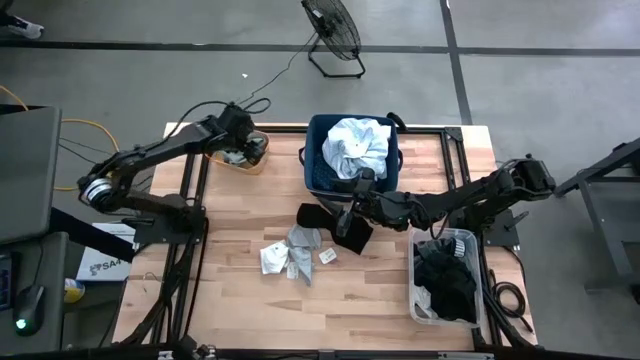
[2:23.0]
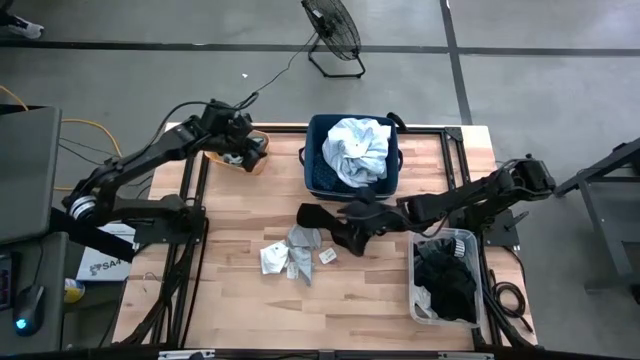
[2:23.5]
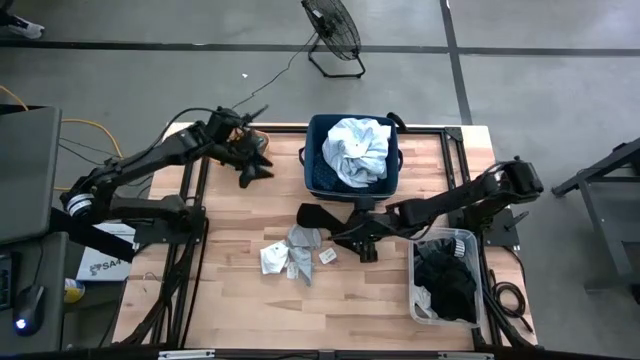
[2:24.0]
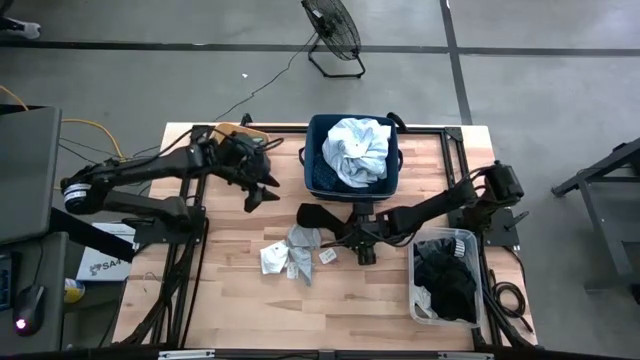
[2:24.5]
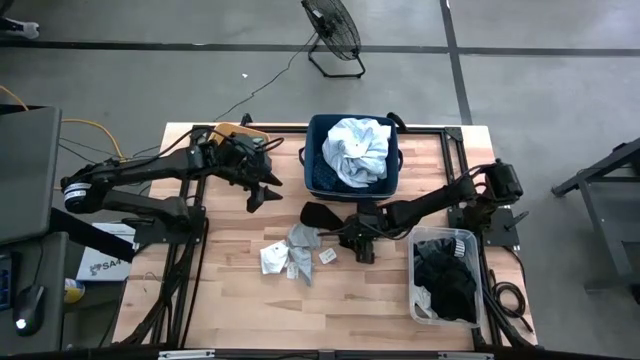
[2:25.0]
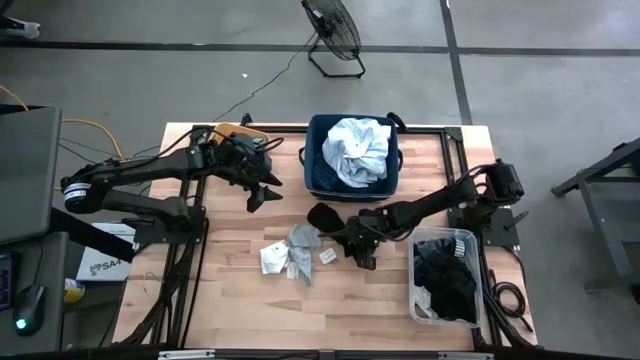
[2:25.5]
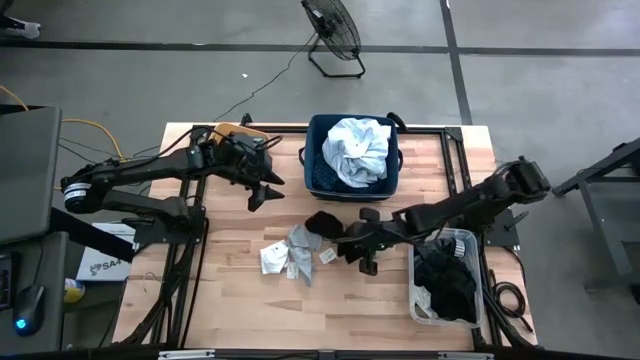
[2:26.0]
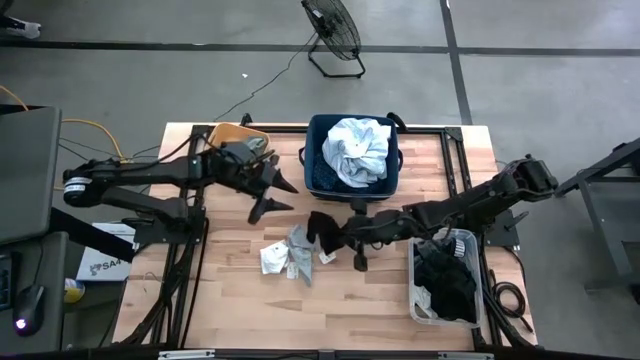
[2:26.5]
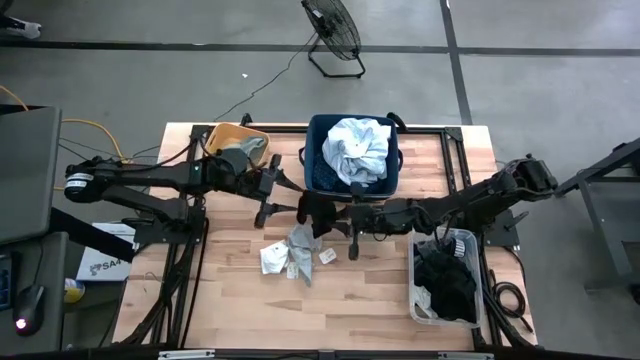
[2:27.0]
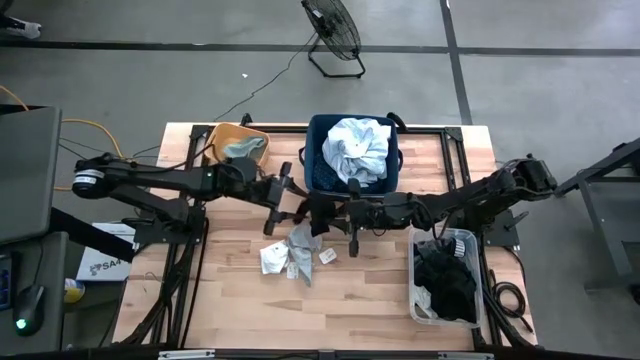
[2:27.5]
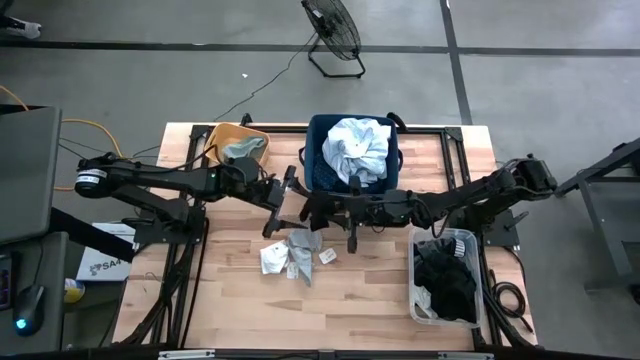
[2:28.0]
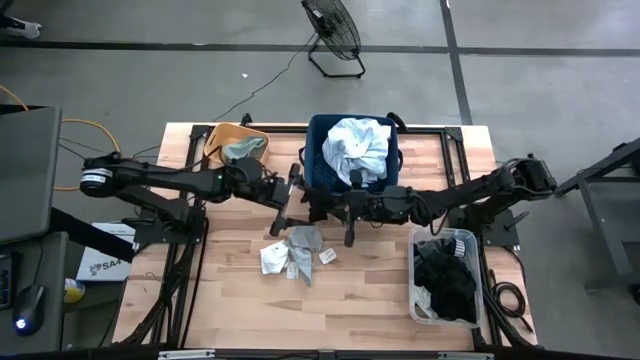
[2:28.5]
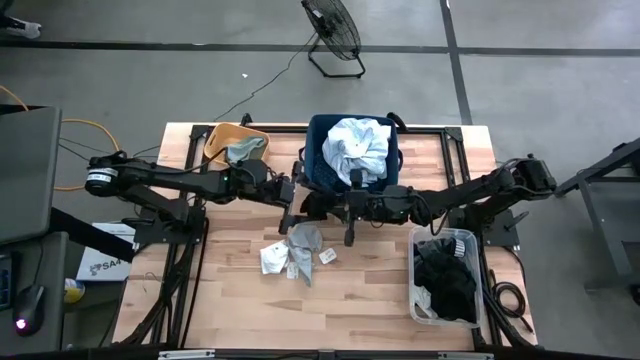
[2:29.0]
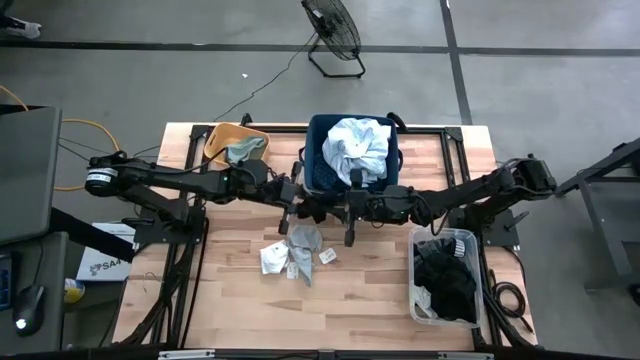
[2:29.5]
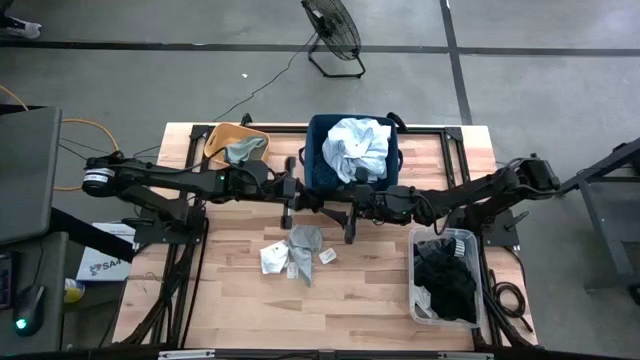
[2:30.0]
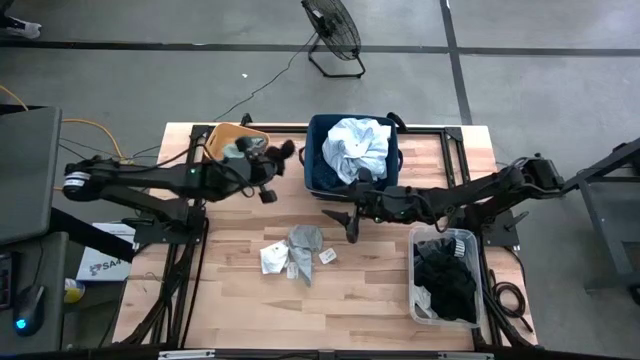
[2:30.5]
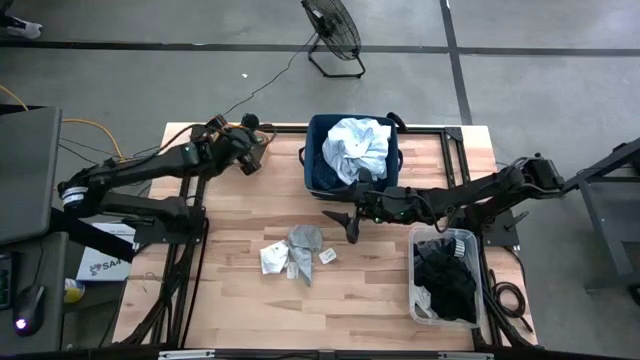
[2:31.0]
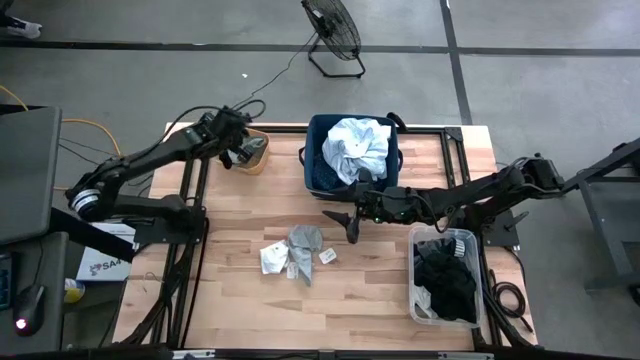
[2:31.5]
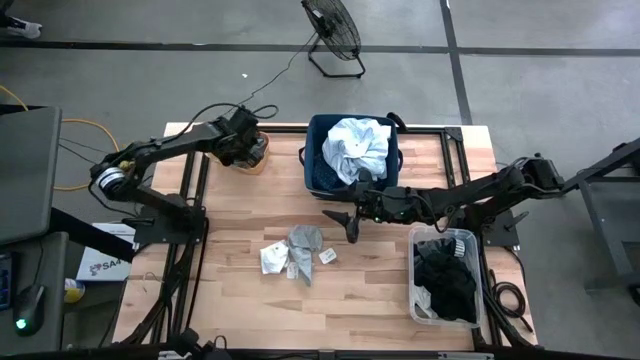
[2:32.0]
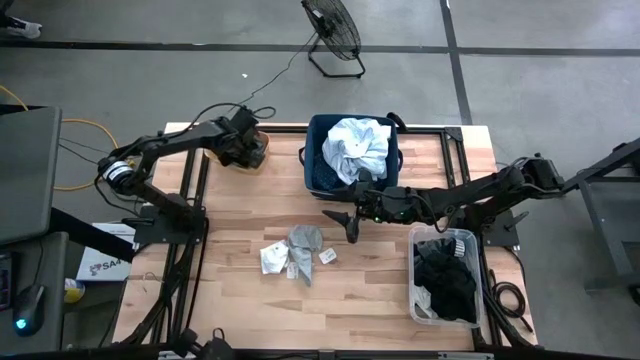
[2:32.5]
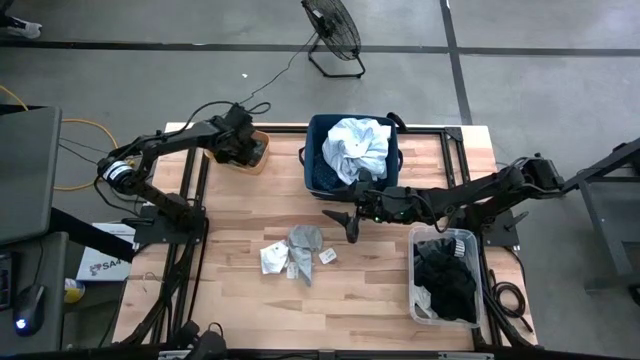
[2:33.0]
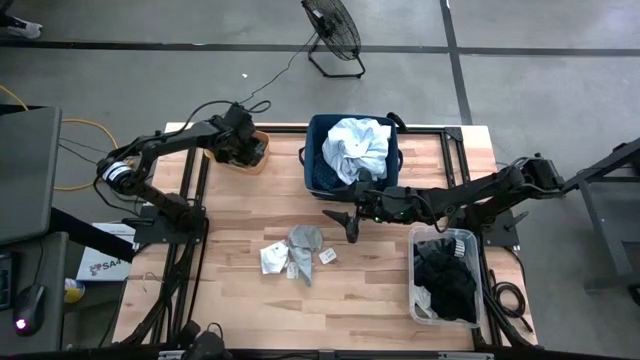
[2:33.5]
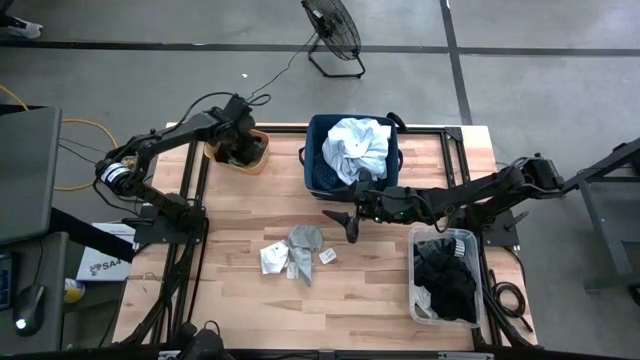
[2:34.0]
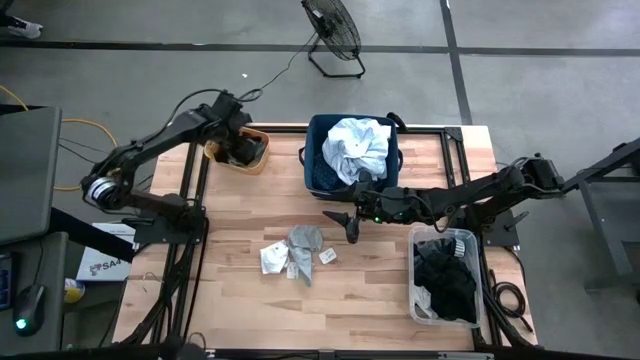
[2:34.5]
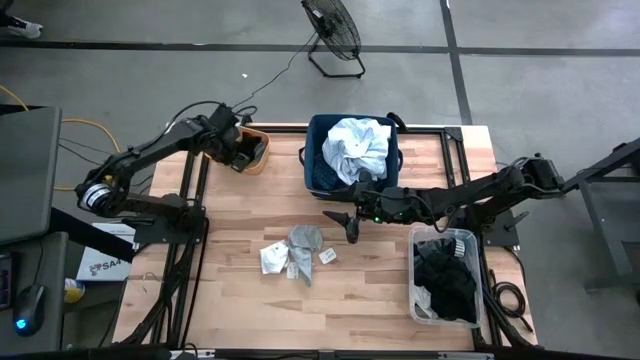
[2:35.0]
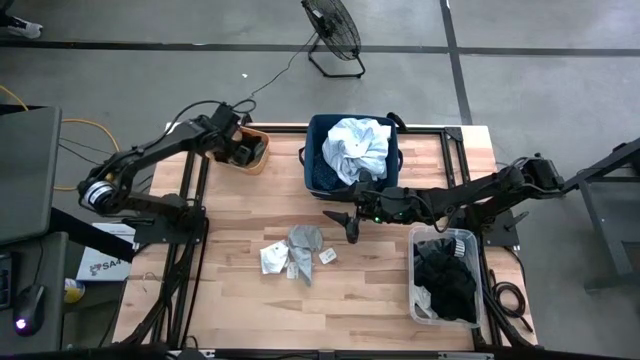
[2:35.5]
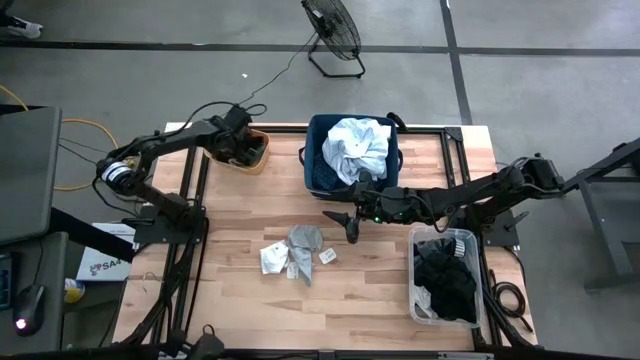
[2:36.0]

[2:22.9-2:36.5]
Task: Pick & Place Cloths
Put the black sock into the yellow bin

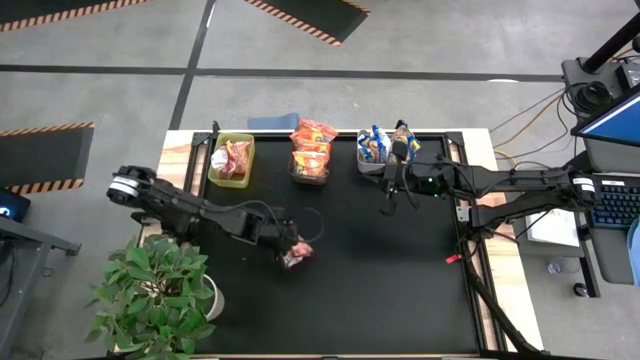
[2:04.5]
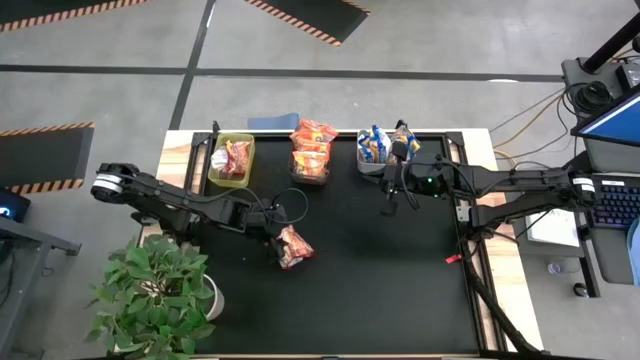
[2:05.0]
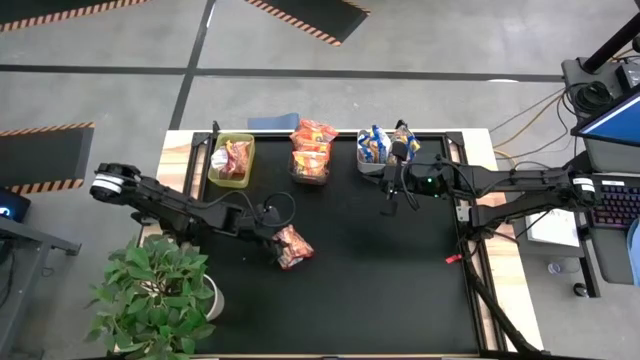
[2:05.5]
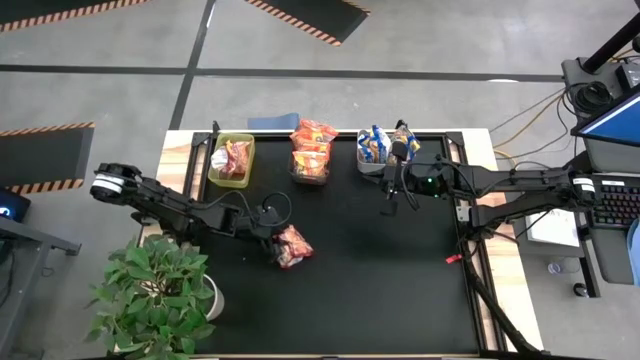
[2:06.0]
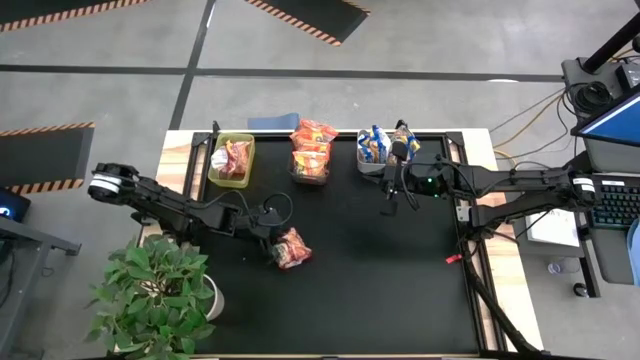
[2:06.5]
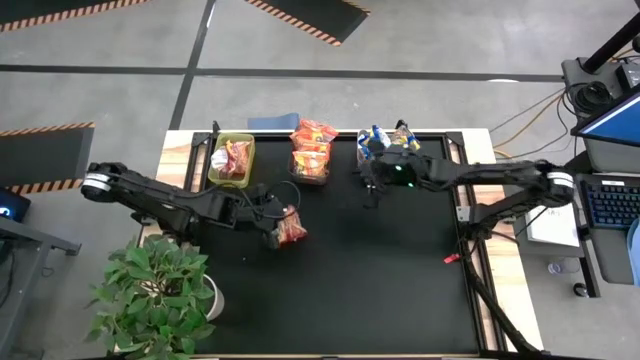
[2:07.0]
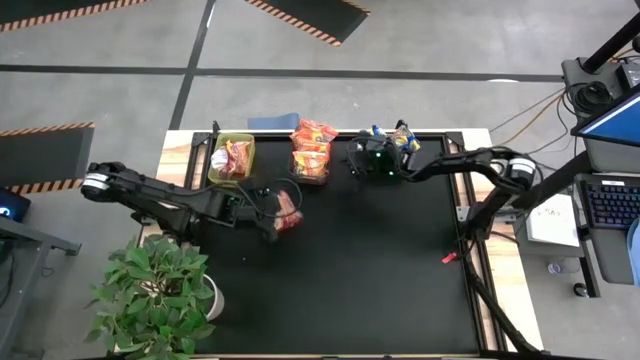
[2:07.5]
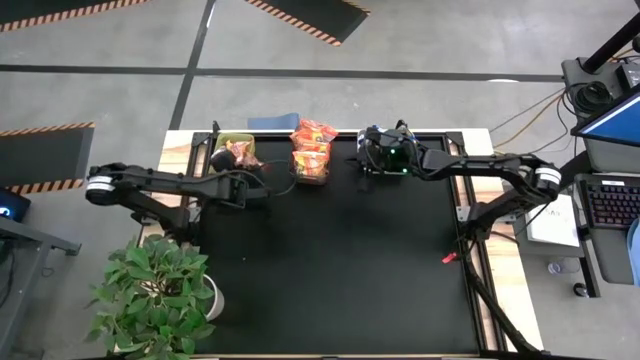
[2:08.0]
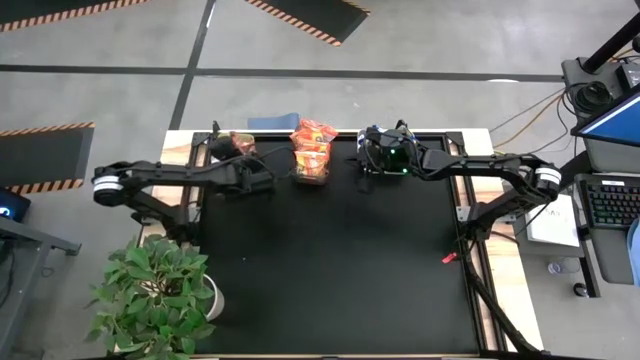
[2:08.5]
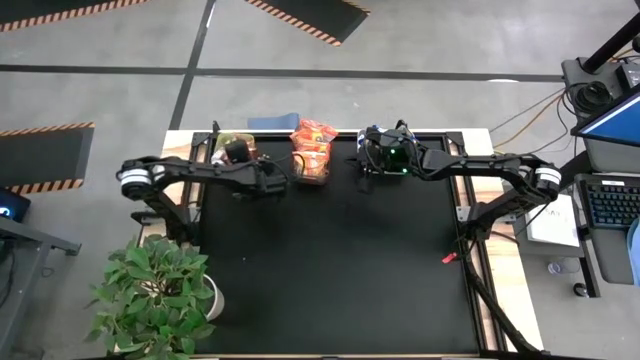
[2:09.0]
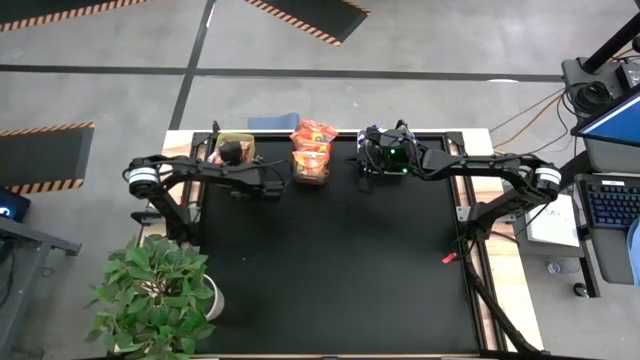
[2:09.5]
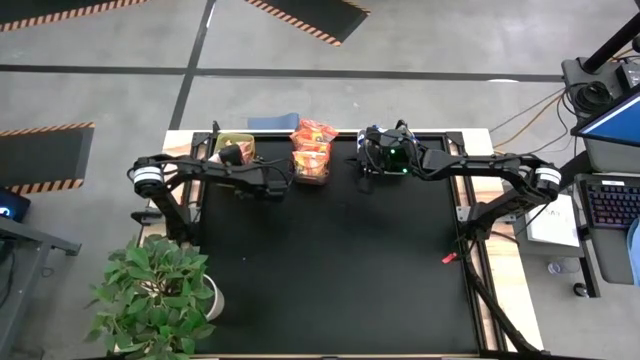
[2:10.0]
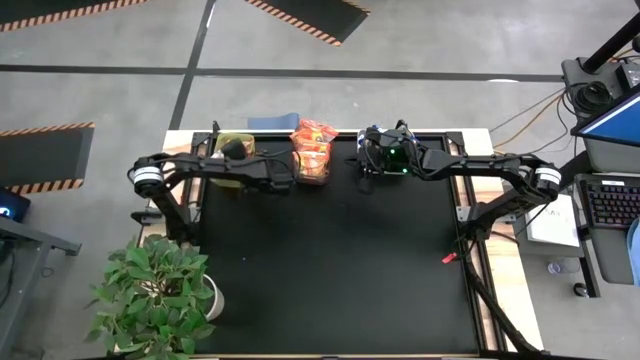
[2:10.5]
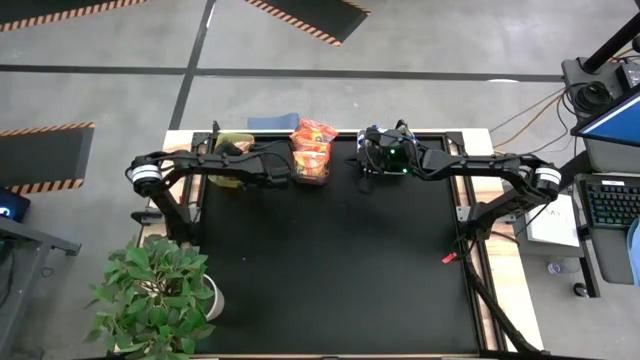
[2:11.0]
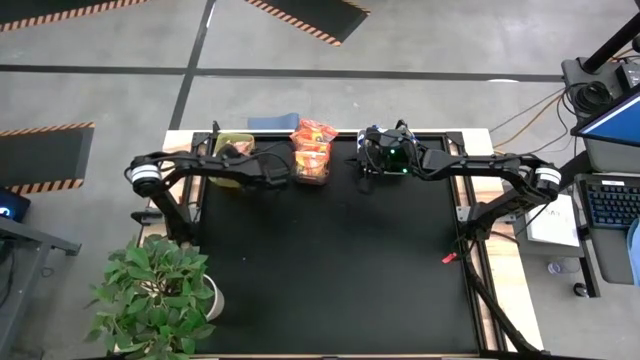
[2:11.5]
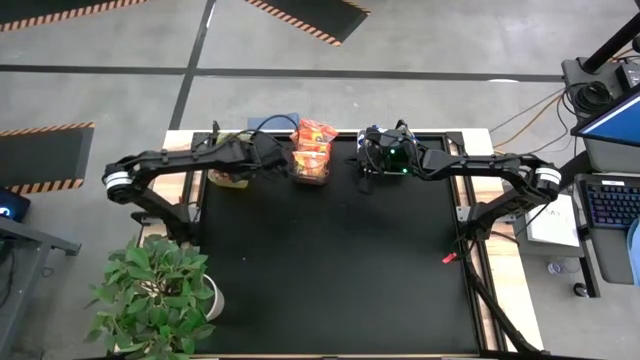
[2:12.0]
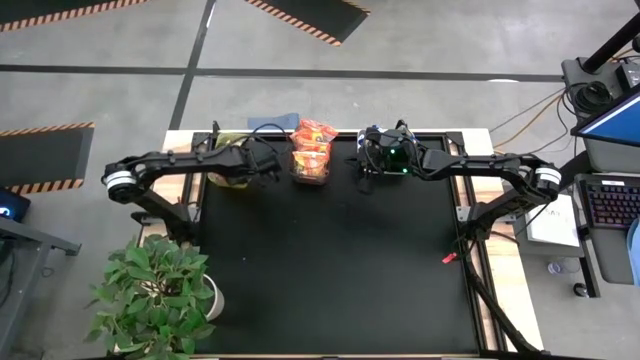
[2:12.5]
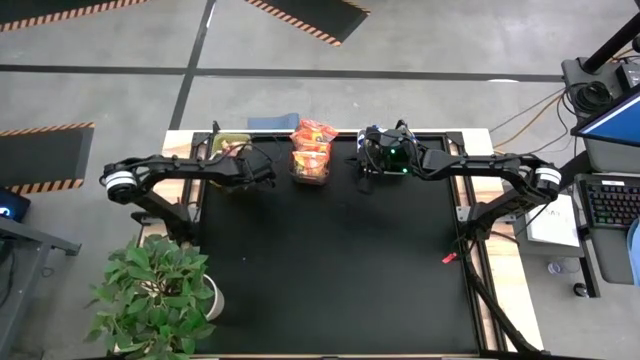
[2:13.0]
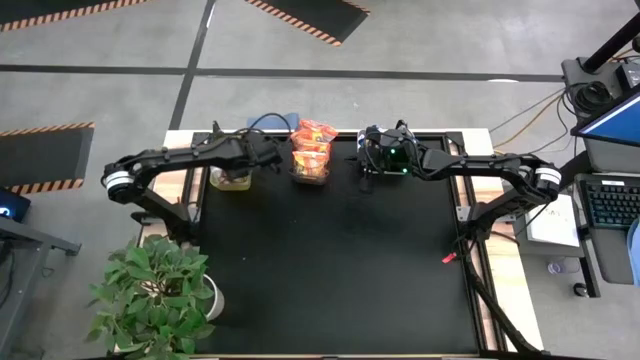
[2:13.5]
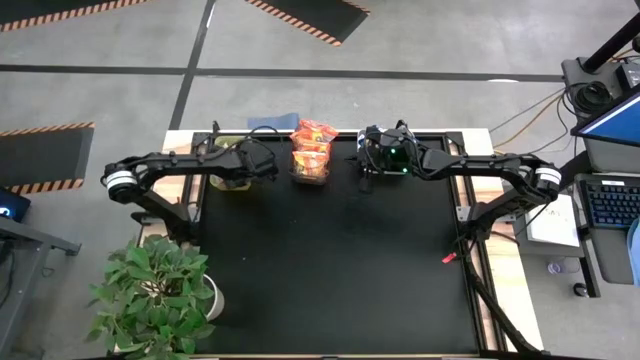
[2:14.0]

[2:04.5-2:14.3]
Task: Sort Maruchan noodles
Put the red noodle pack into the yellow bin
